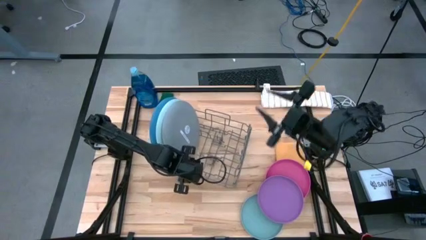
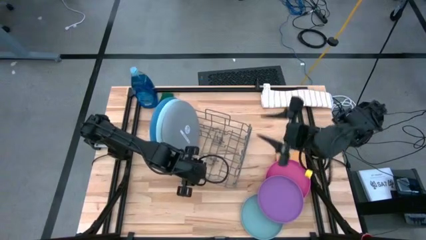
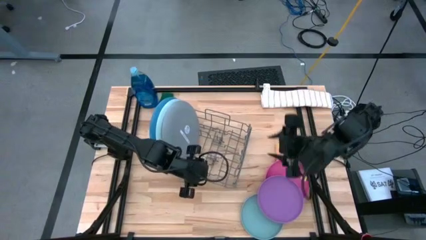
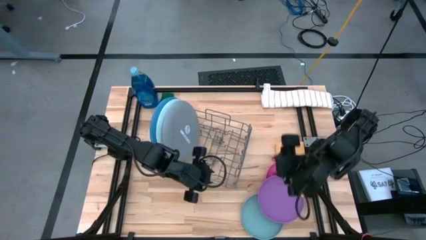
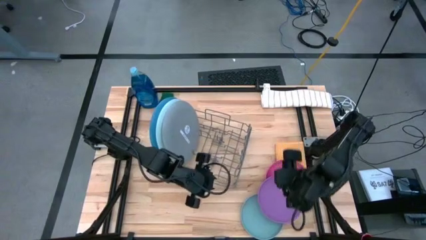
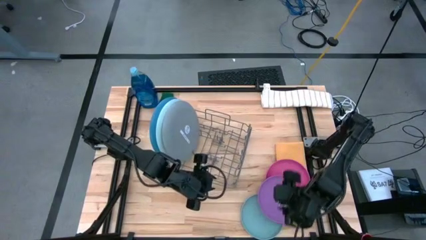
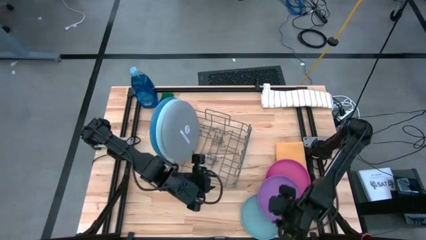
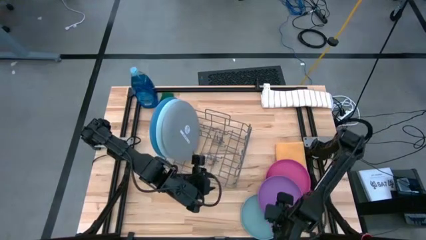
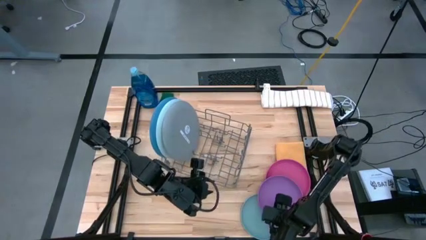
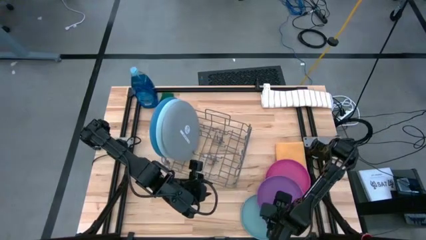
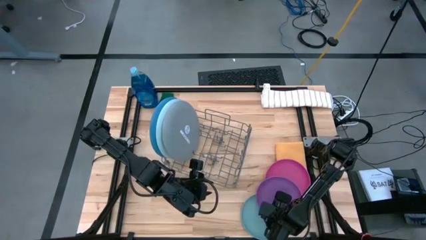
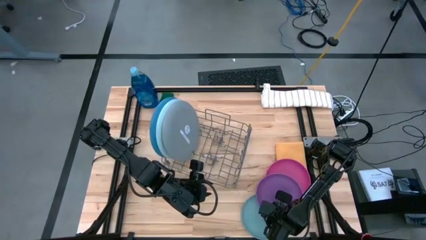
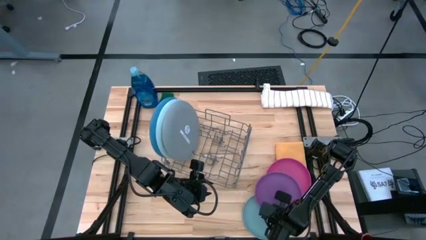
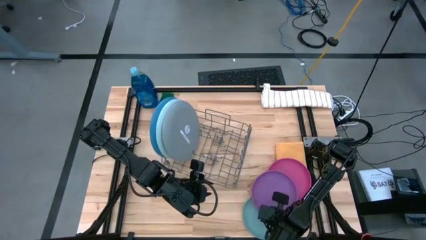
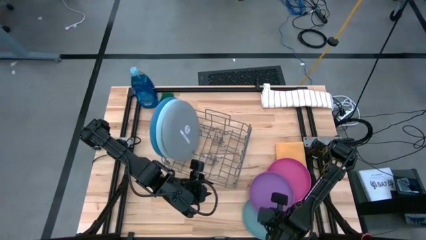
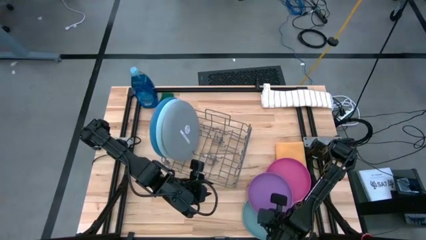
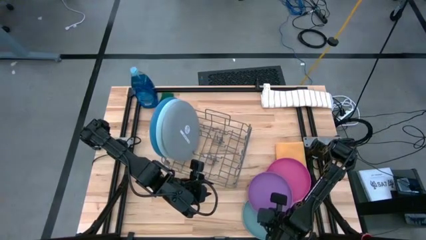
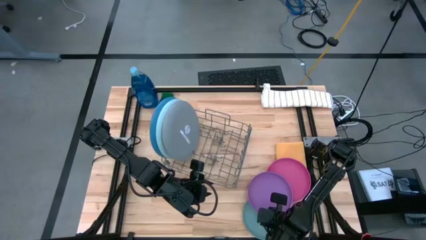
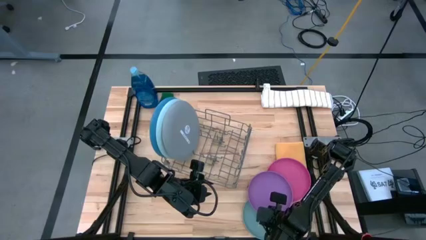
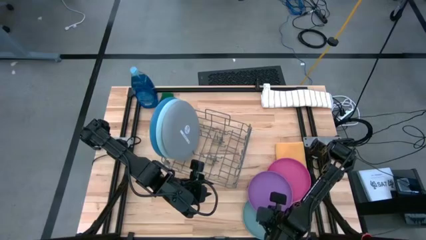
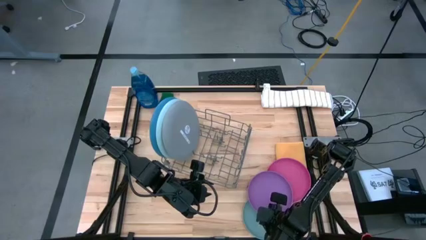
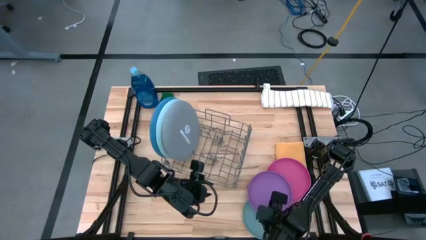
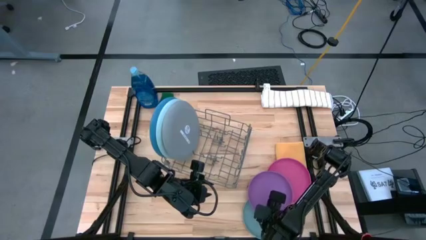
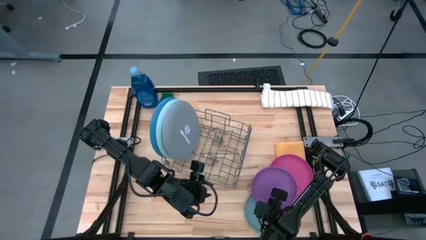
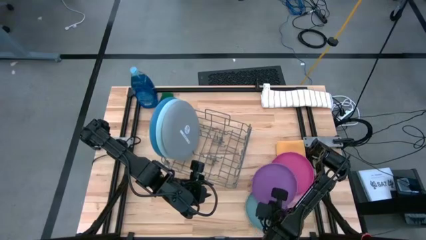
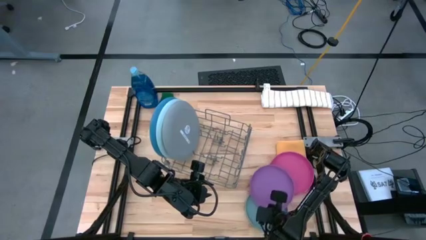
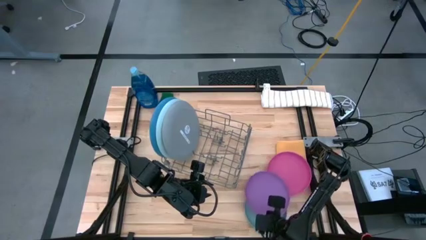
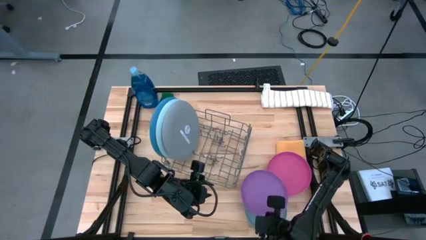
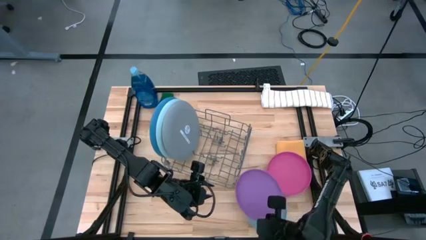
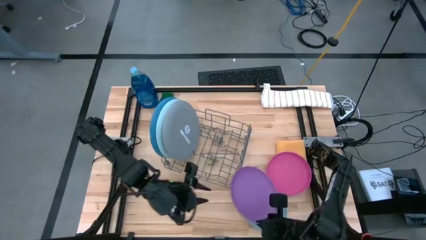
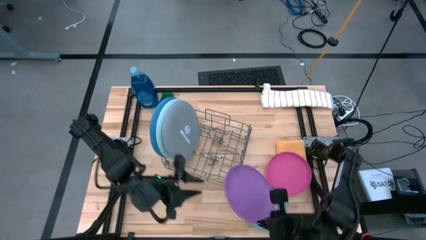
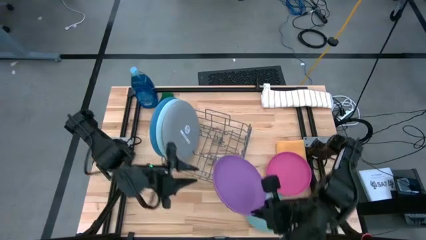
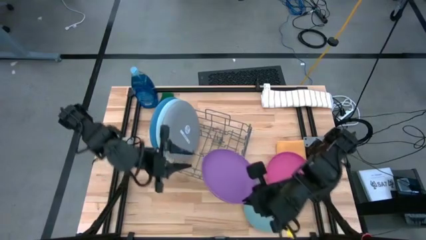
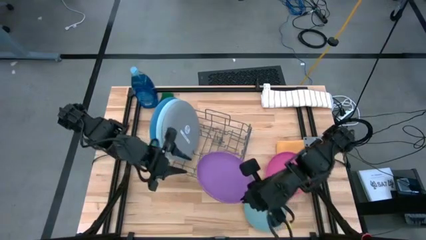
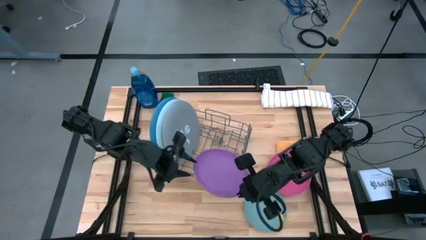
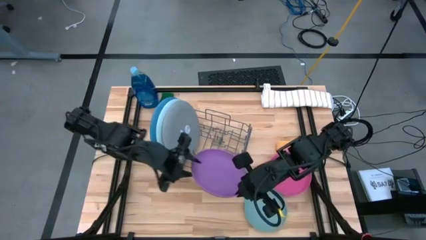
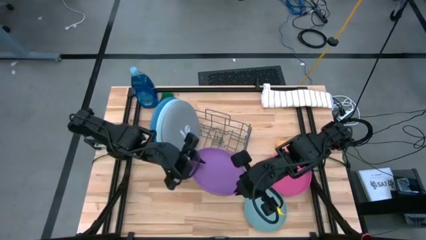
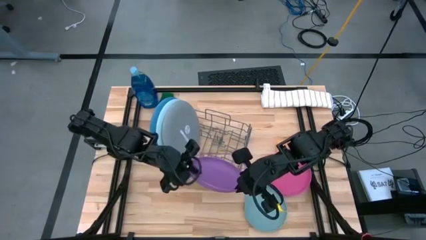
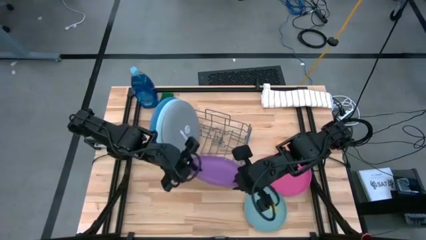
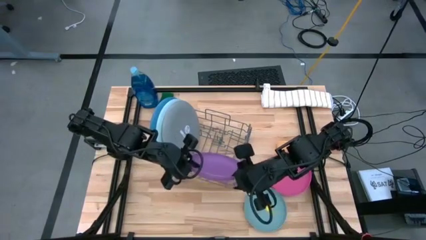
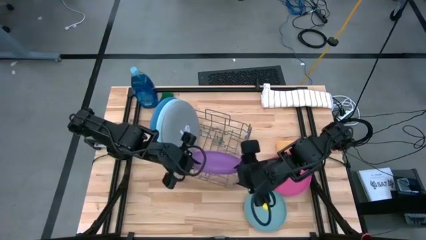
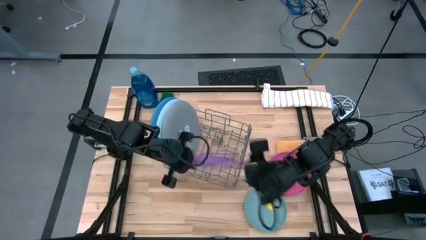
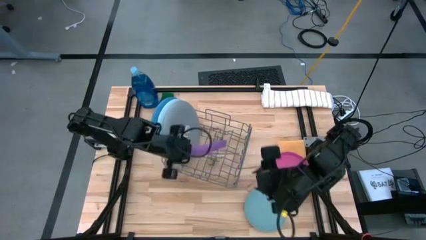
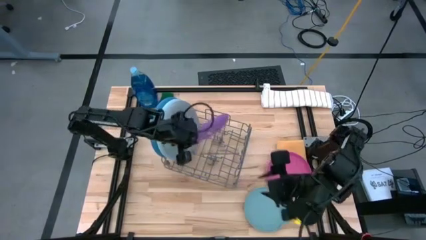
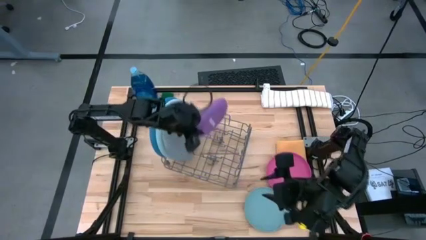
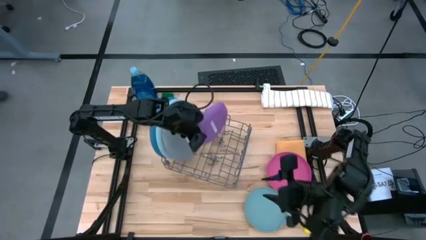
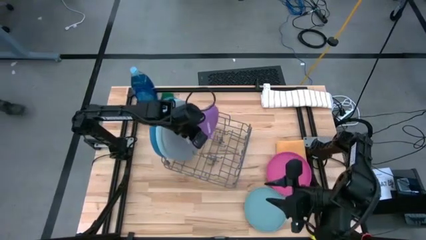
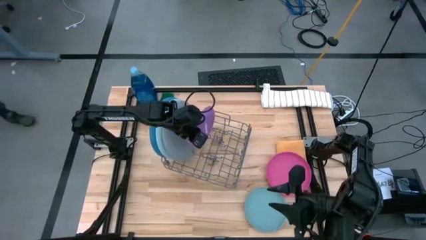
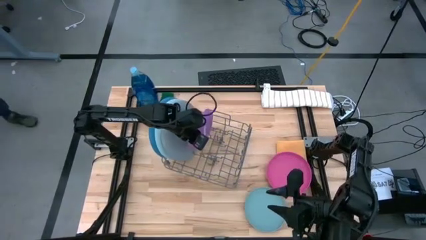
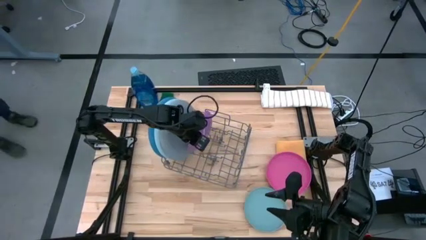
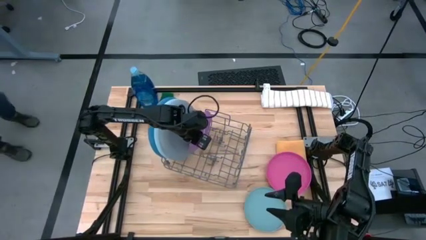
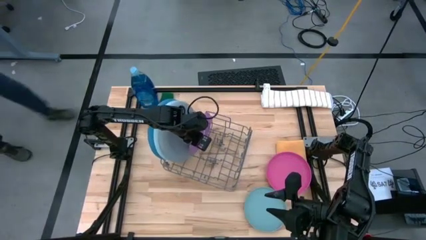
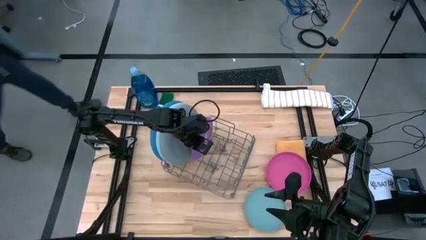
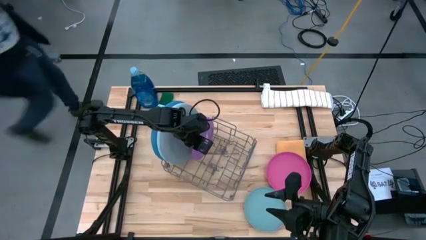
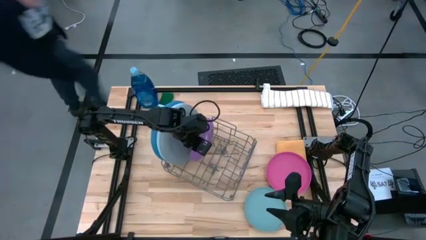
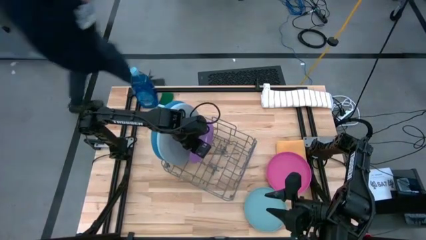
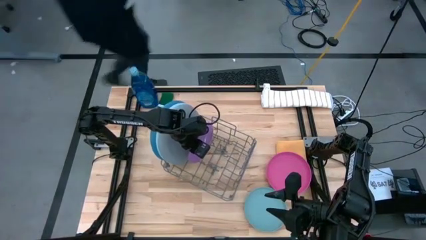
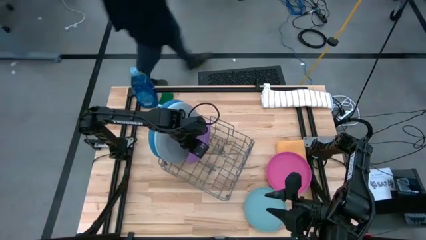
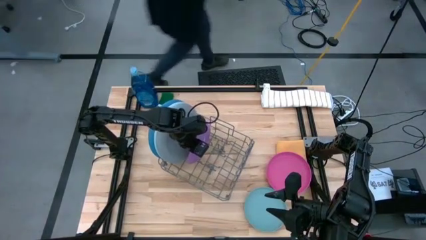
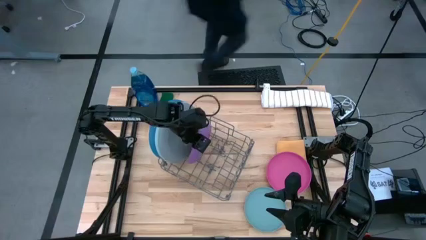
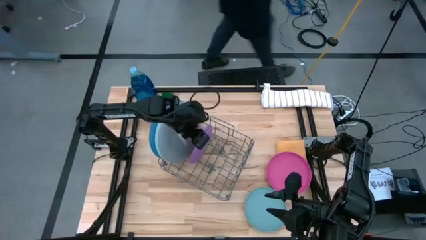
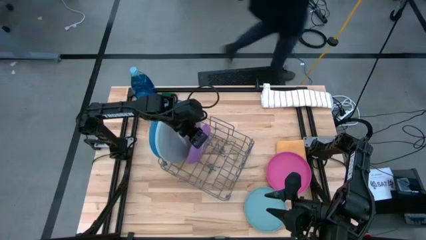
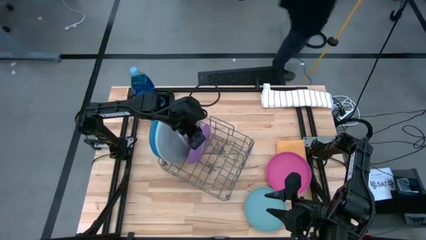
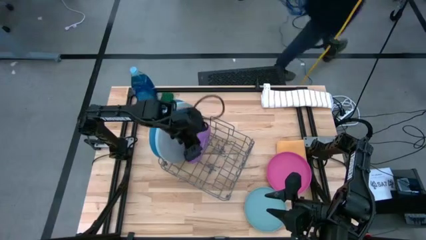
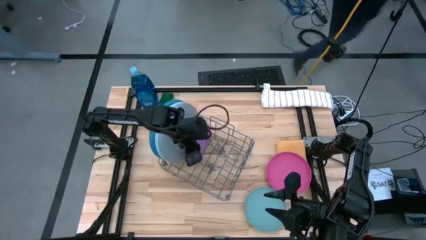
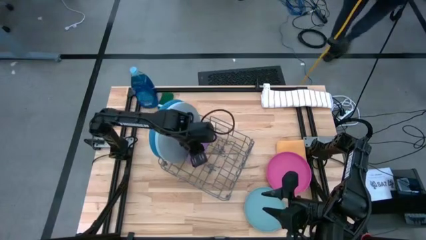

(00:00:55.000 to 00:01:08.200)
Task: Sort dishes
Put the small purple plate into the dish rack
